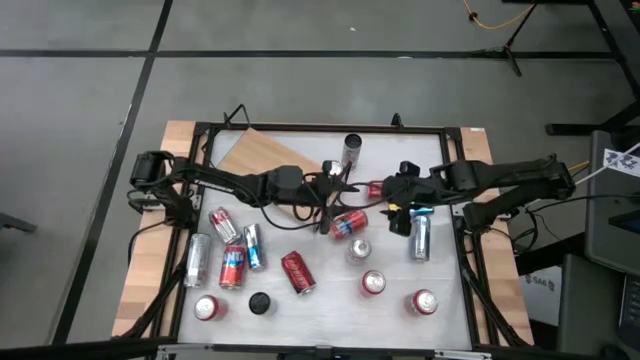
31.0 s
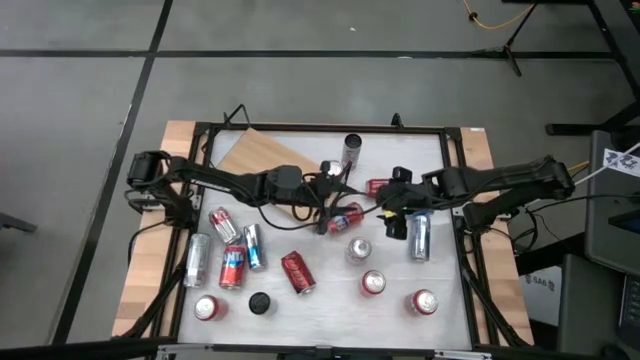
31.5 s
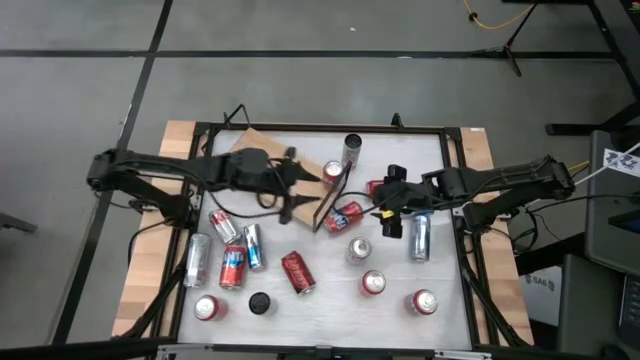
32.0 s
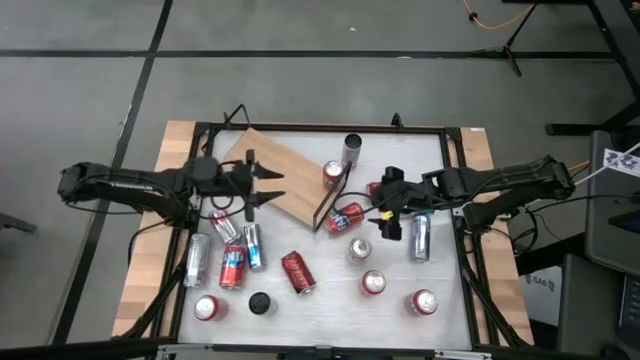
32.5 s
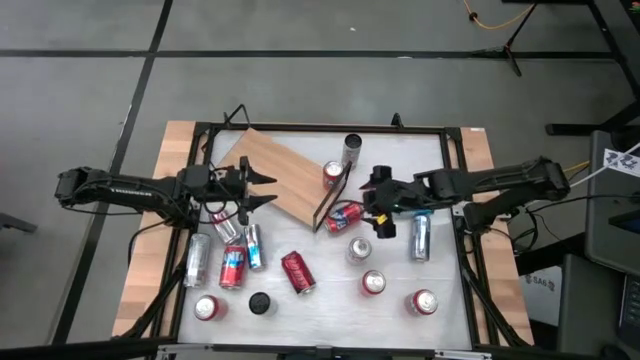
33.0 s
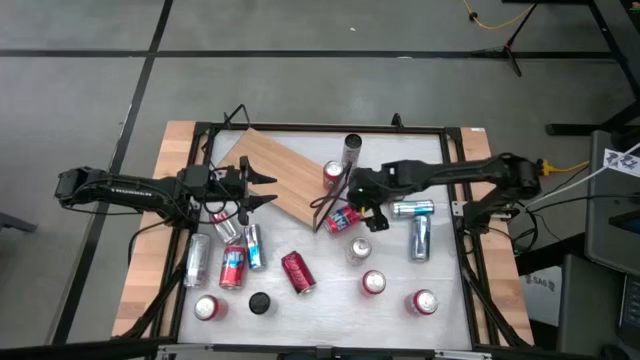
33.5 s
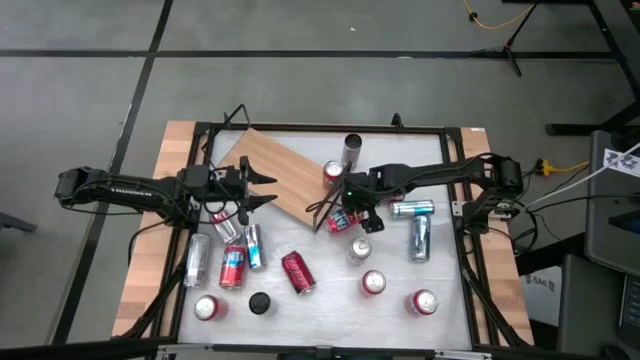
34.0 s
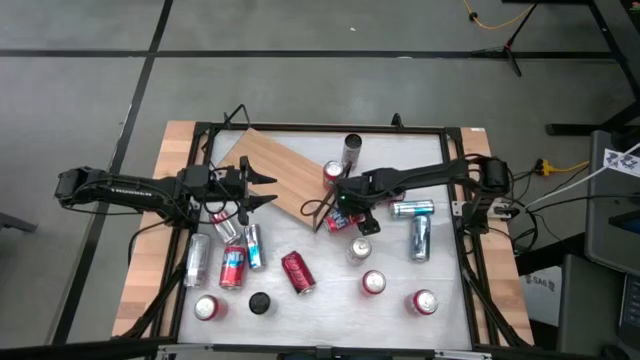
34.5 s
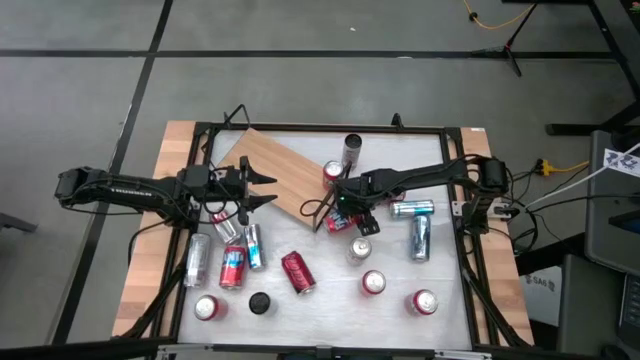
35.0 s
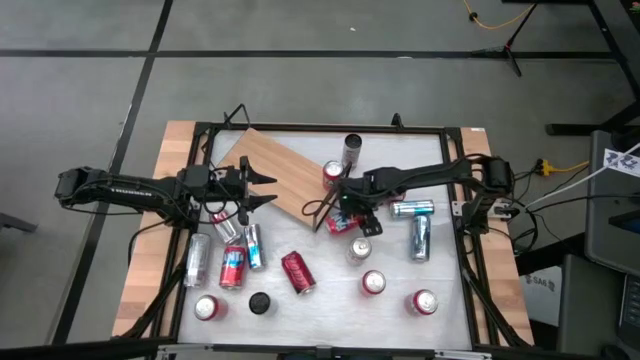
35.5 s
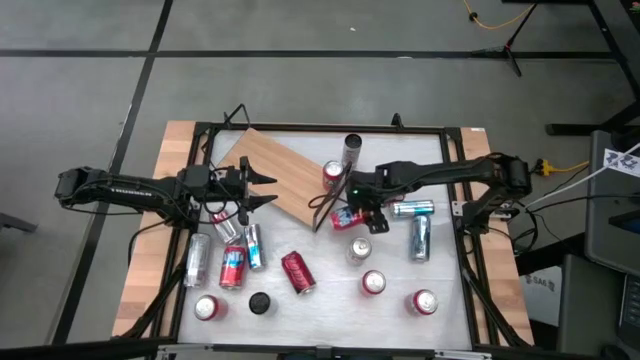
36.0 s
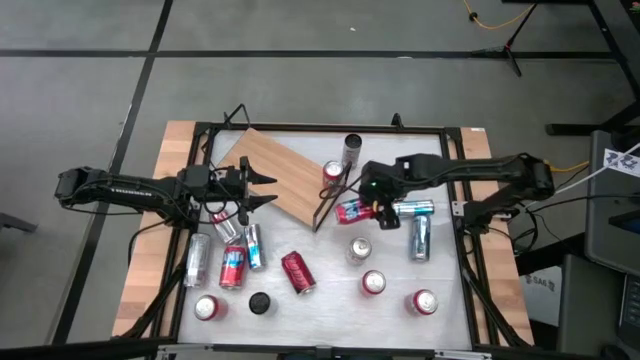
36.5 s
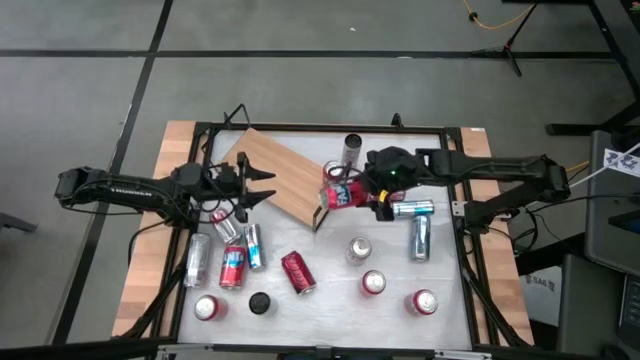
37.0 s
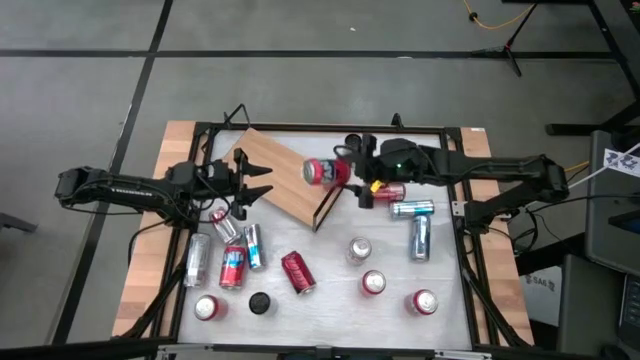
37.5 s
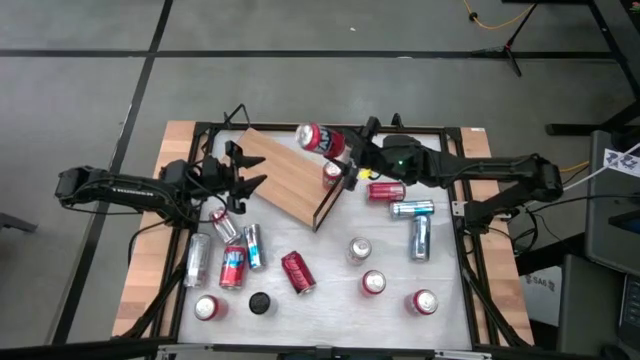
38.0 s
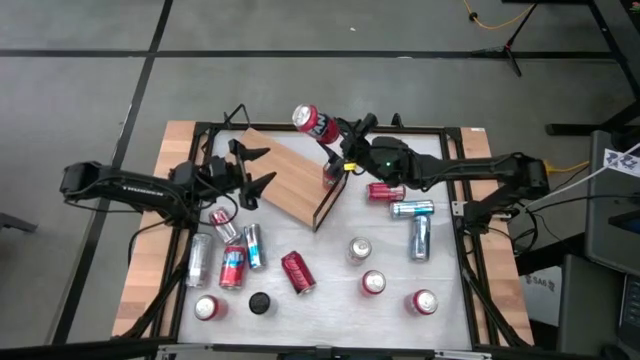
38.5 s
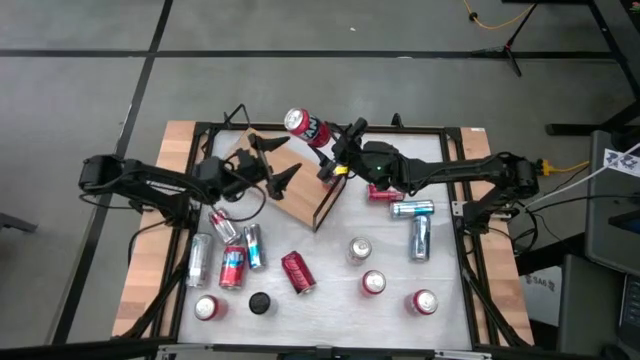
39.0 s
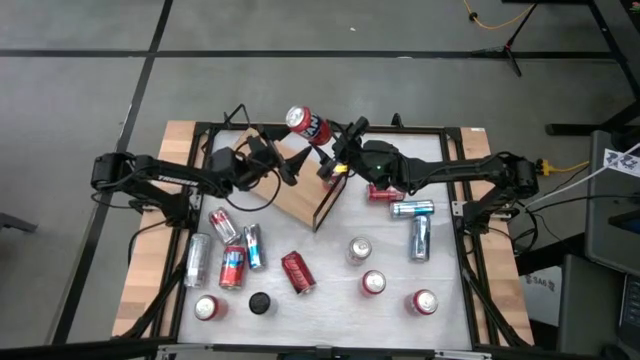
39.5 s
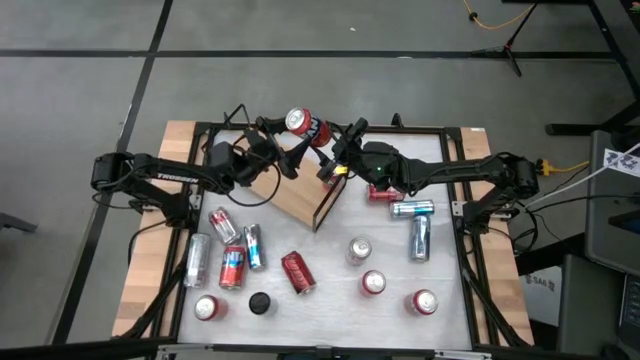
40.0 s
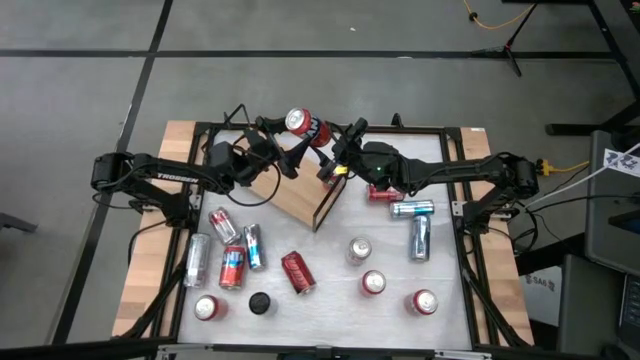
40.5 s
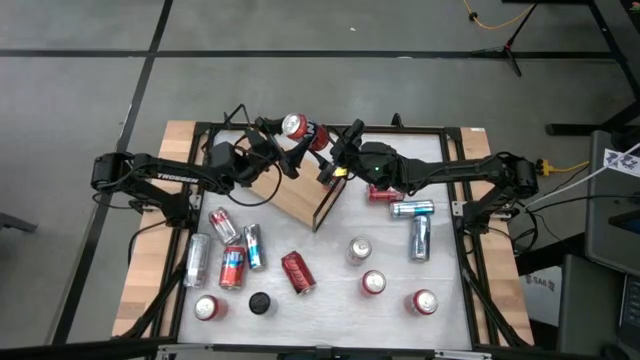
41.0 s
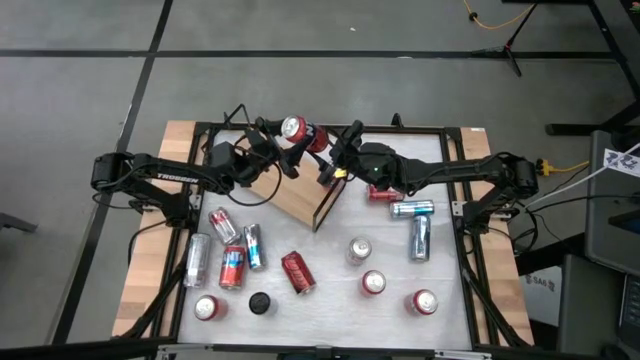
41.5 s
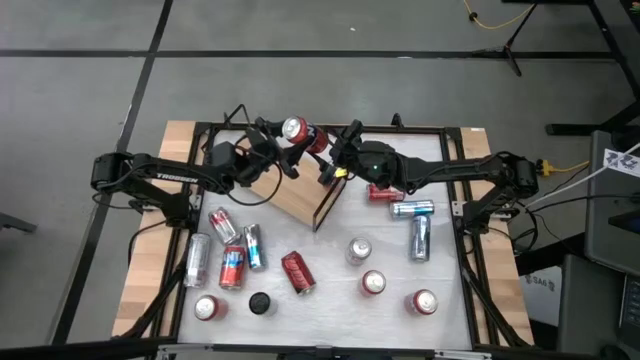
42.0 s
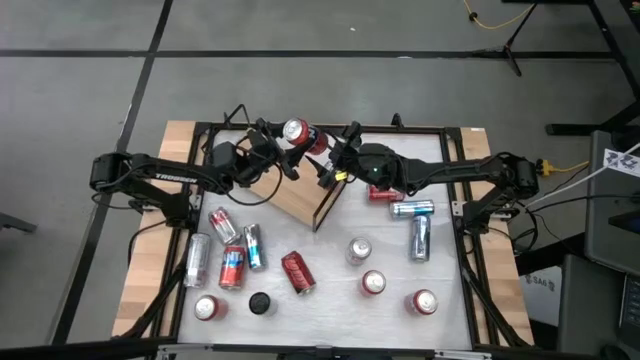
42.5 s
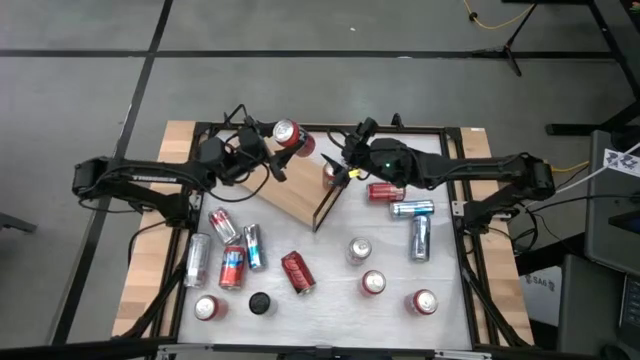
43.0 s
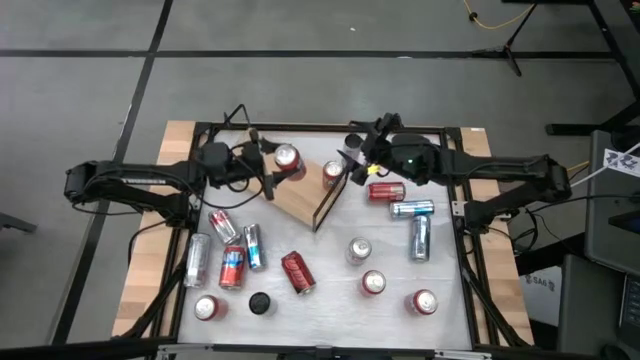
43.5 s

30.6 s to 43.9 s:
Task: Pick and place cans onto a shelf
Put the middle right red soda can on the shelf aligned with the other red soda can

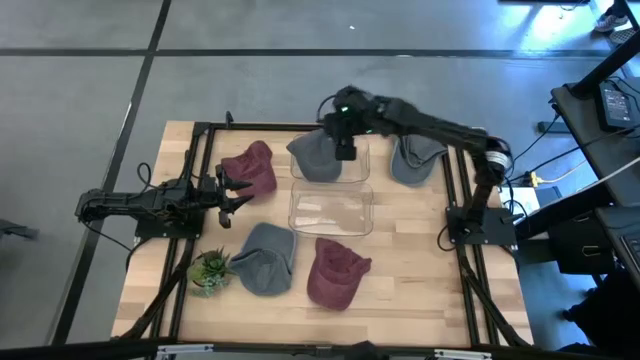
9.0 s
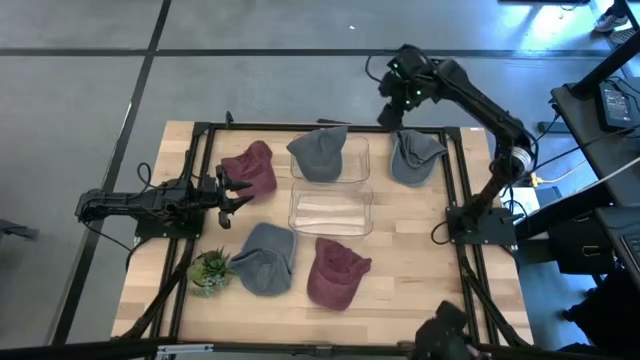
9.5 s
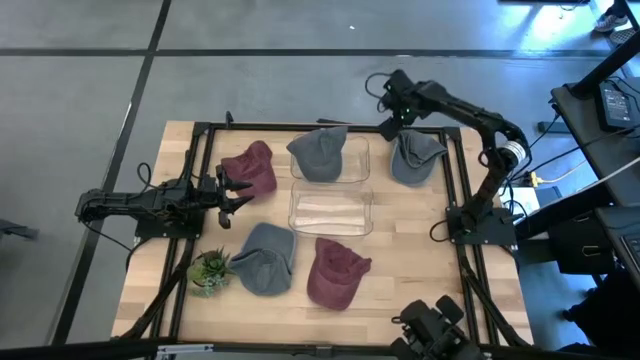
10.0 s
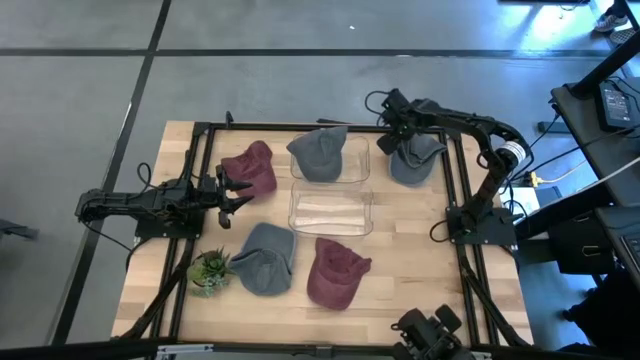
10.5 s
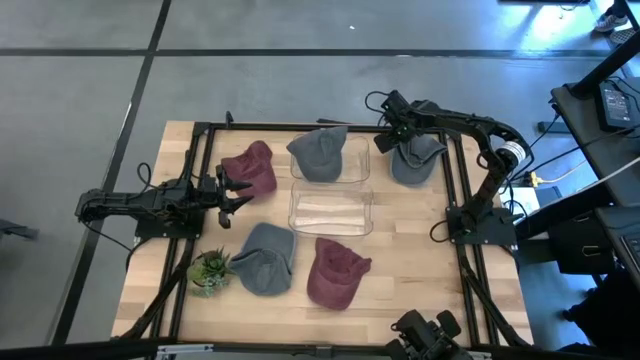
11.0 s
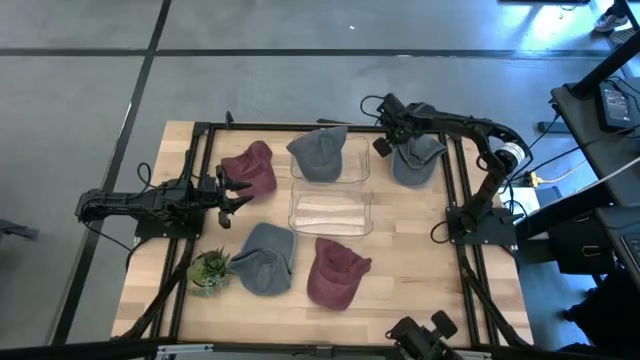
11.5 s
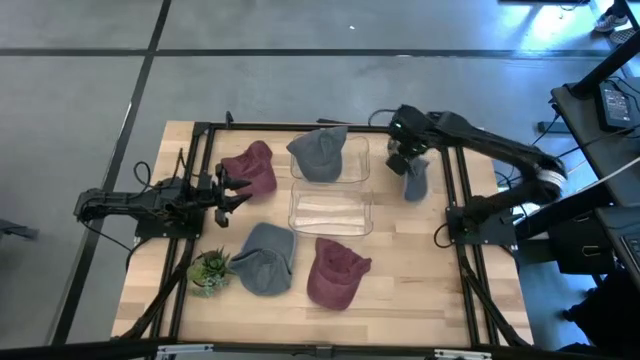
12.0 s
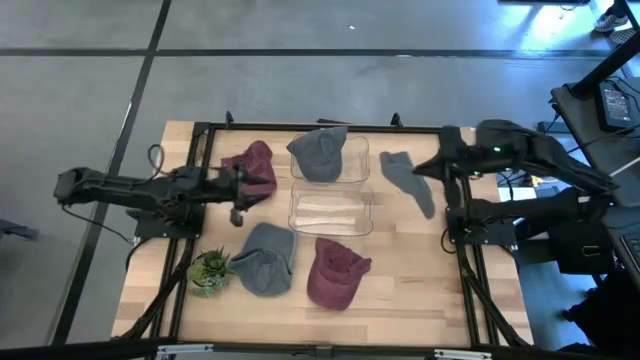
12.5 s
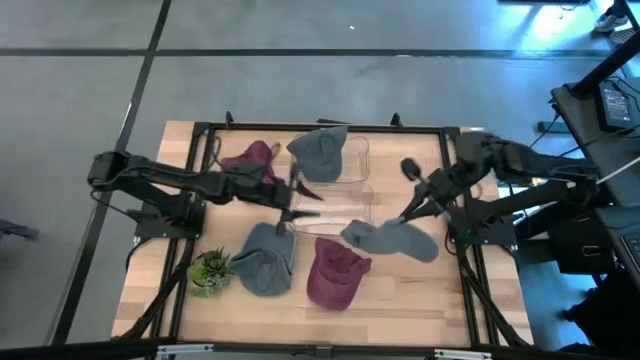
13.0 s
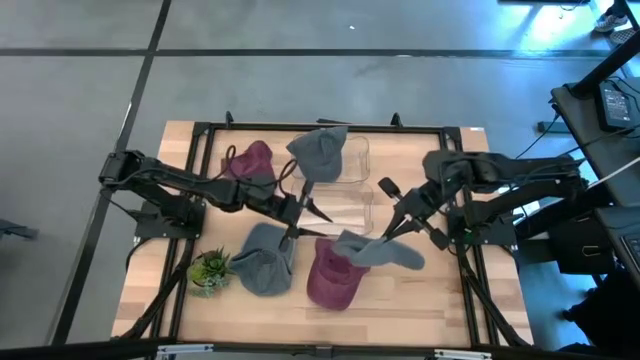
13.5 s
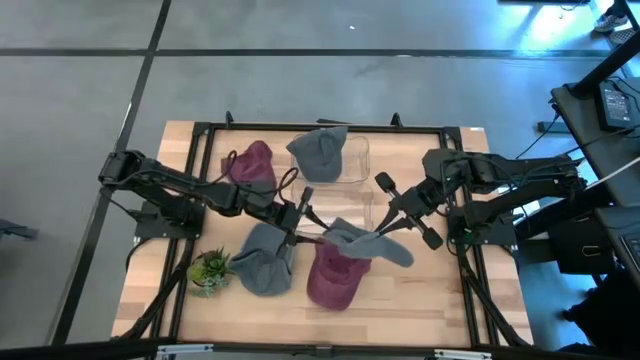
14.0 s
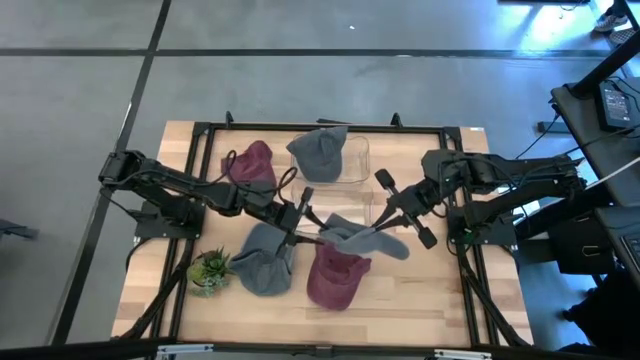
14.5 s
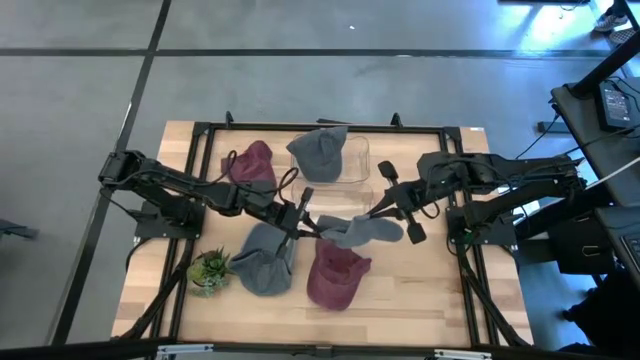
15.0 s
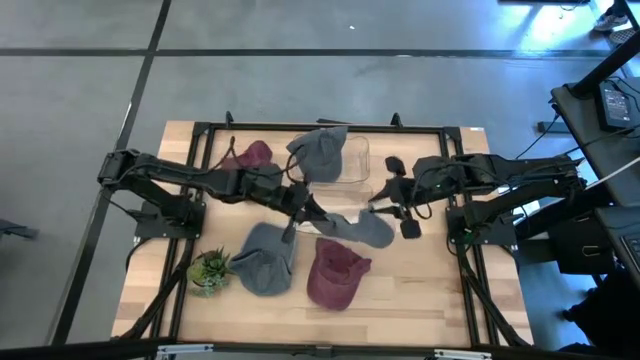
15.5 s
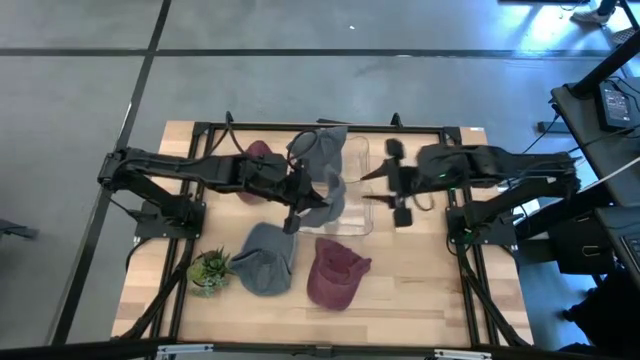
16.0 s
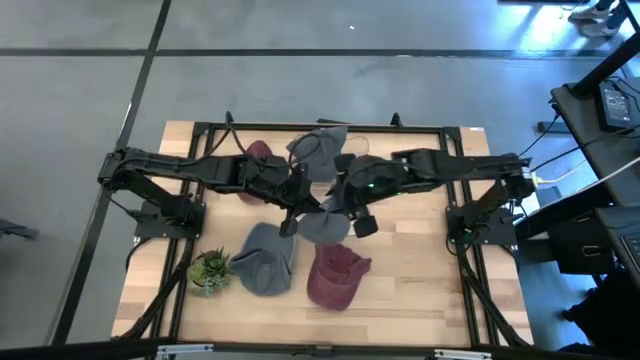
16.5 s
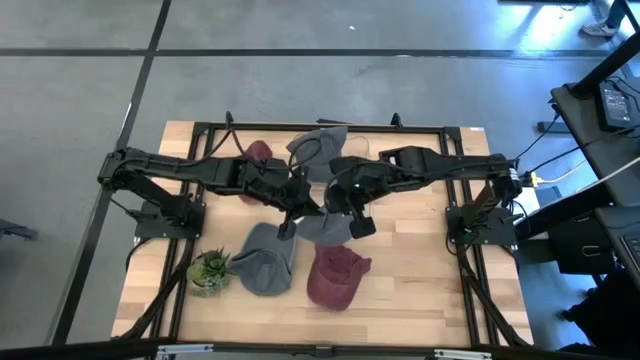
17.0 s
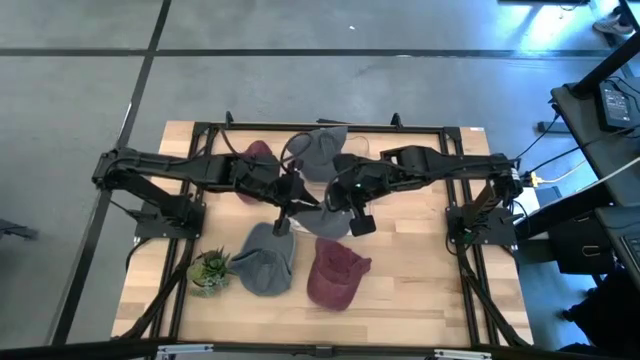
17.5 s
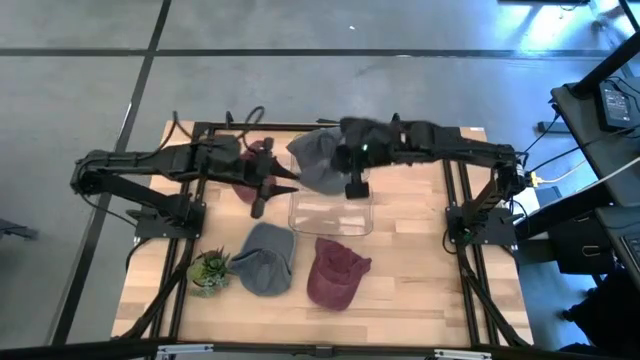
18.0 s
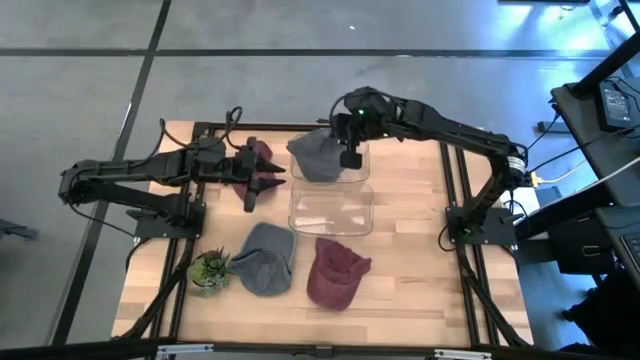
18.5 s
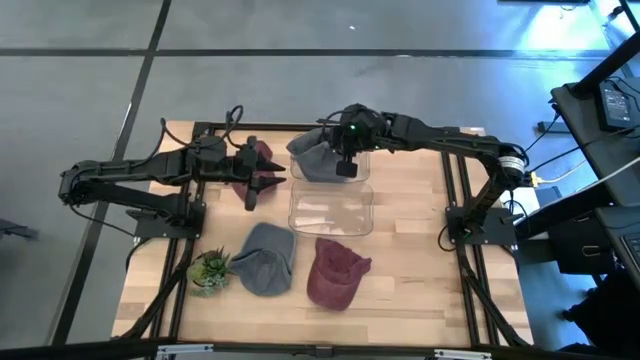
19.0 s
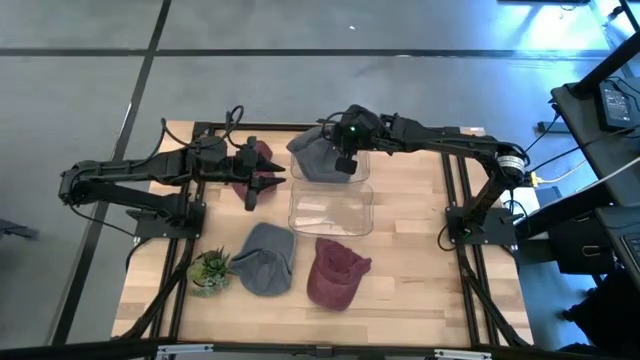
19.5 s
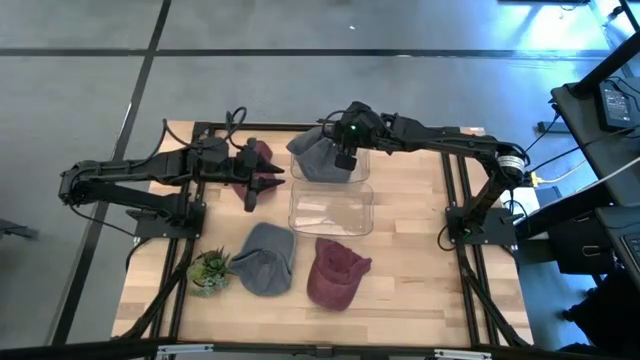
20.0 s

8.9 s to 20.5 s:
Task: Pick & Place hat
Put the top gray cap into the top transparent bin
